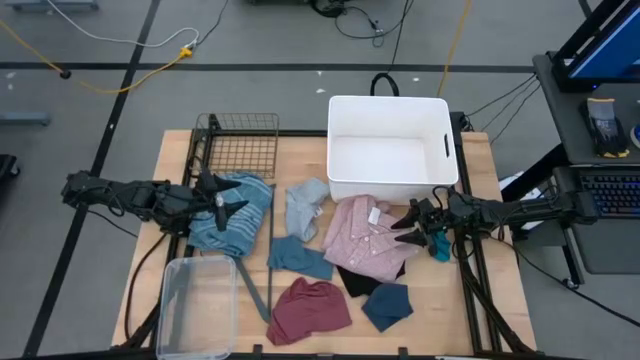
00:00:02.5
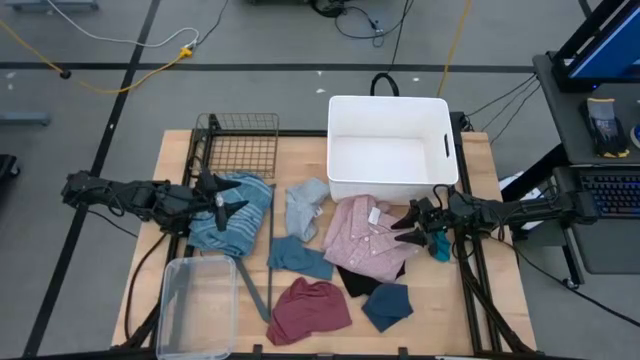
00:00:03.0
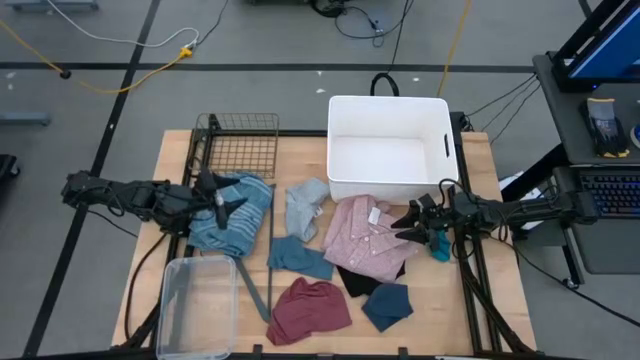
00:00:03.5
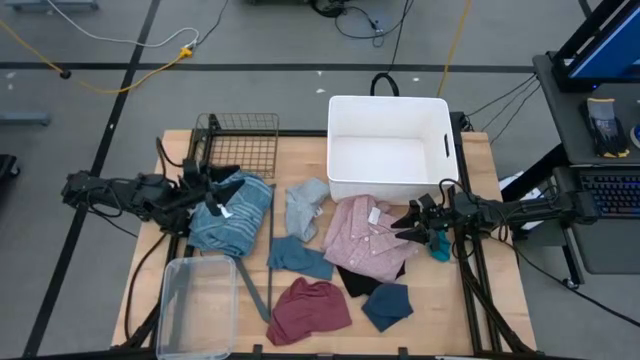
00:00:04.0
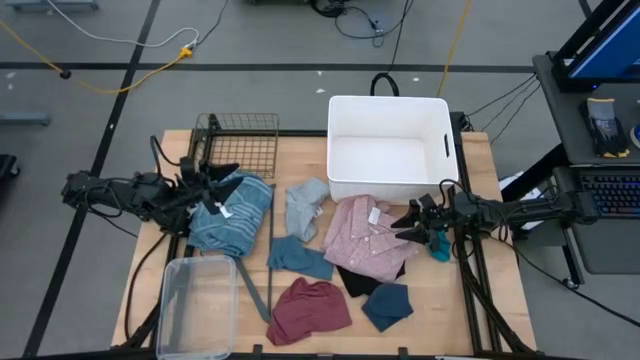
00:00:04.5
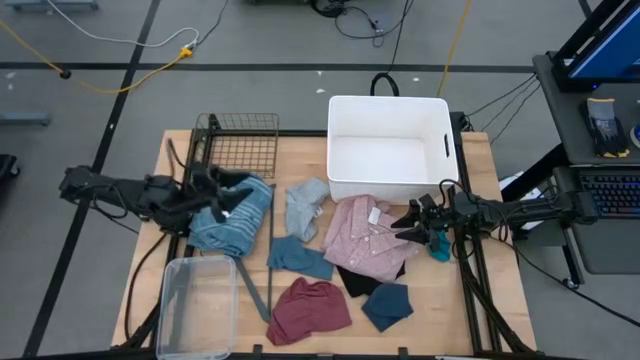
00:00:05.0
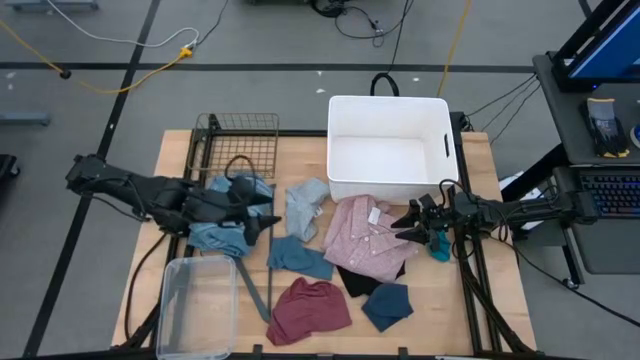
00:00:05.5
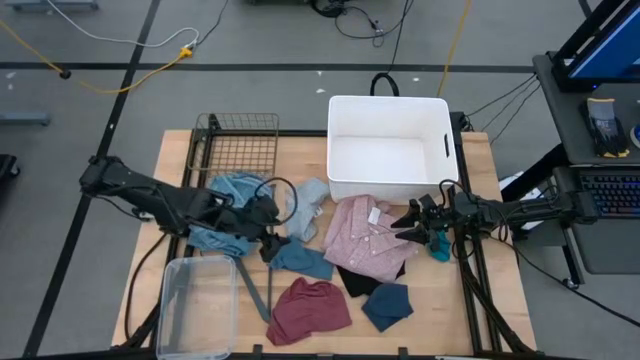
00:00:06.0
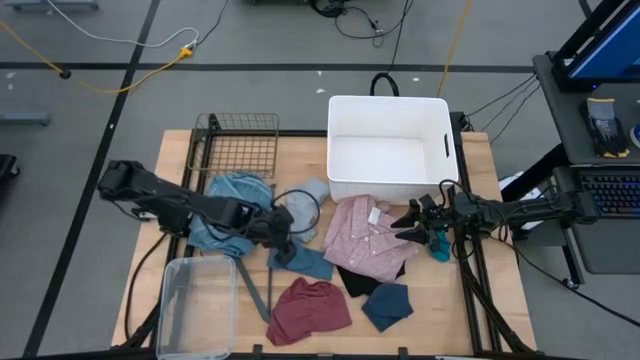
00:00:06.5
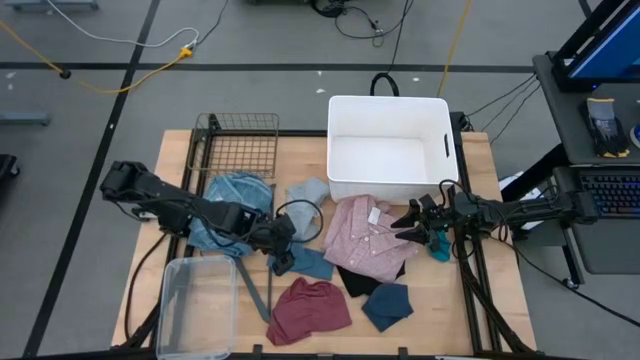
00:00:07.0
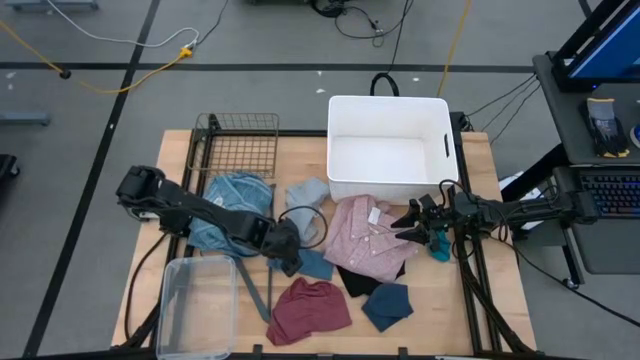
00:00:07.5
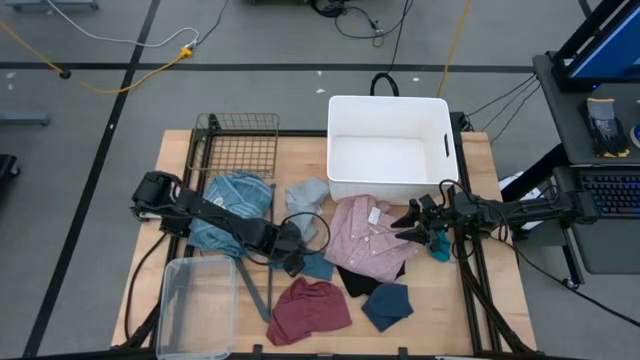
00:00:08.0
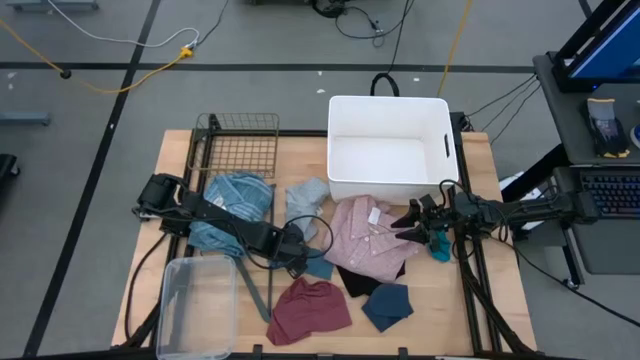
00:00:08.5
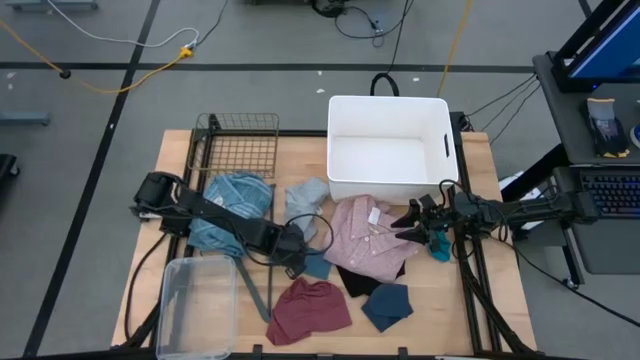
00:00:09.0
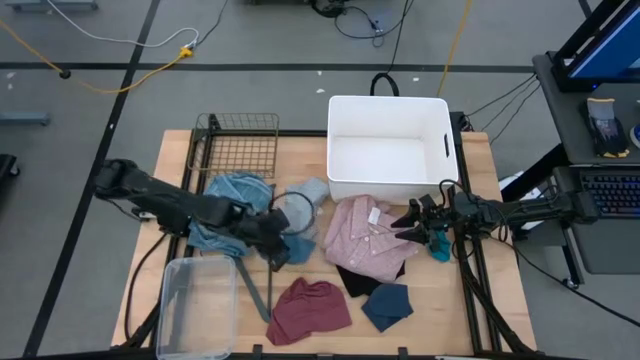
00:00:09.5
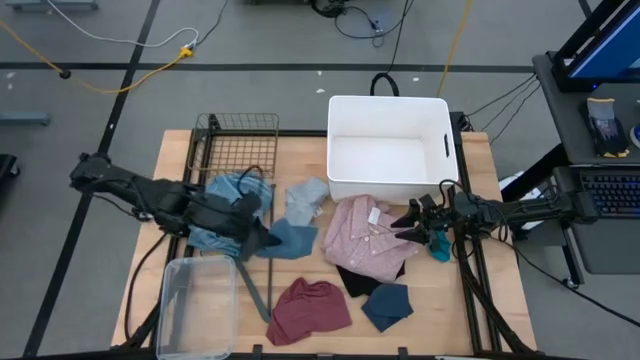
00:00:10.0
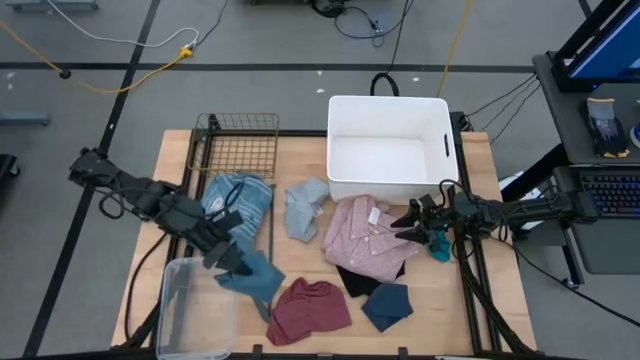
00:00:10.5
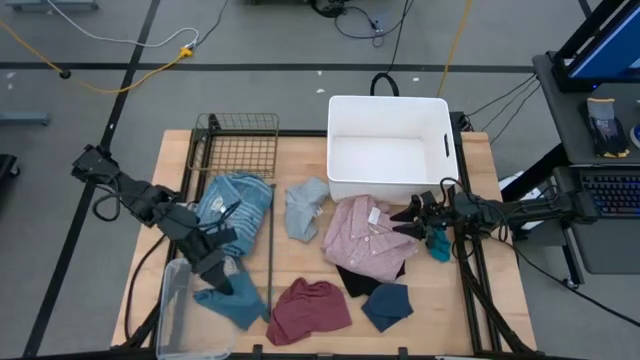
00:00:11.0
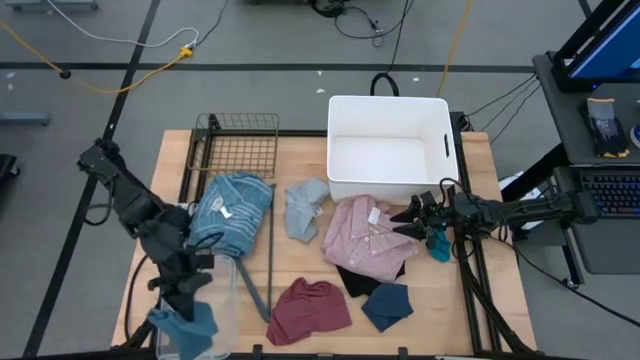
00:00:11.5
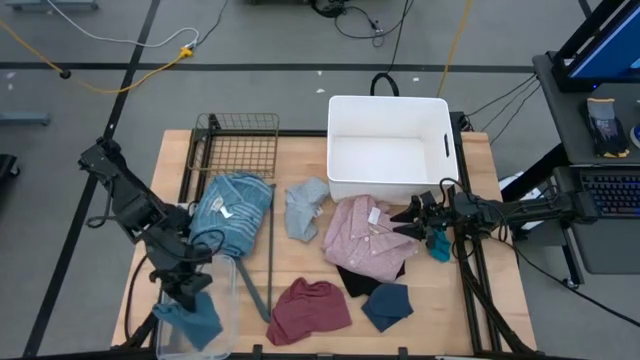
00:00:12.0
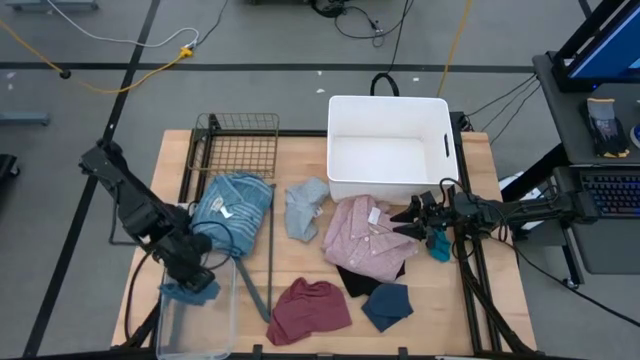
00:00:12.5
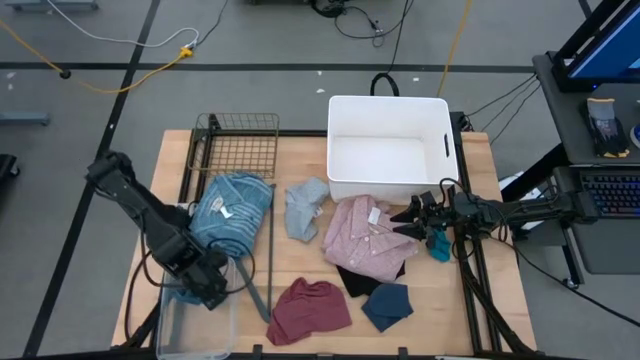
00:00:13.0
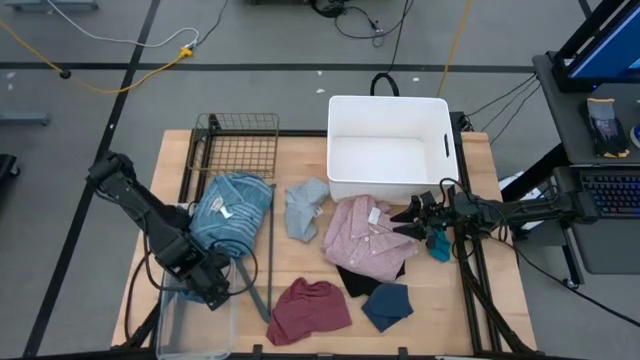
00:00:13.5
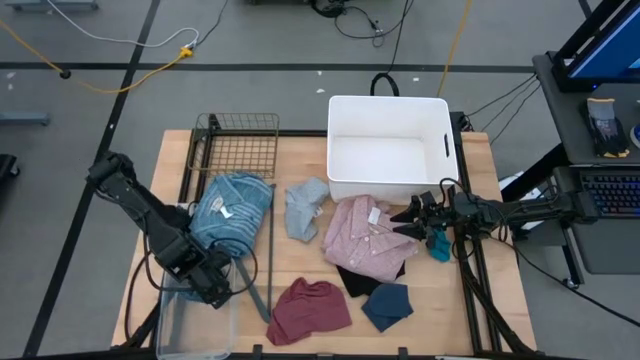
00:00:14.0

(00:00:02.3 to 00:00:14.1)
Task: Pick & Place Cloths
Put the blue sock into the transparent bin

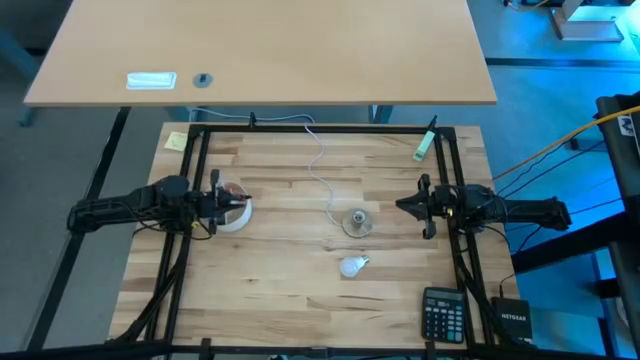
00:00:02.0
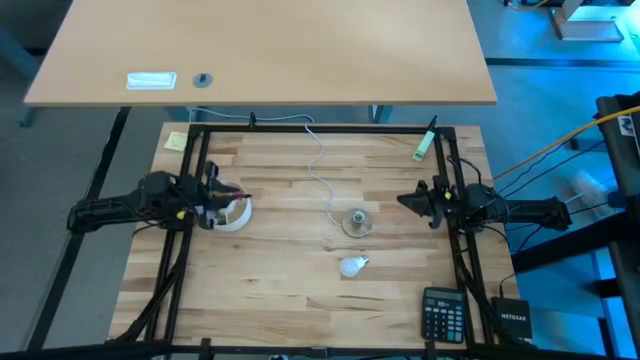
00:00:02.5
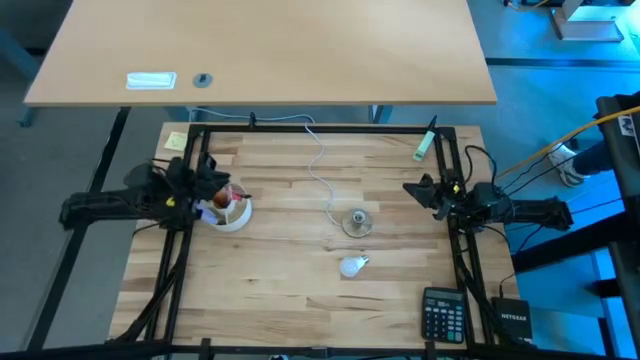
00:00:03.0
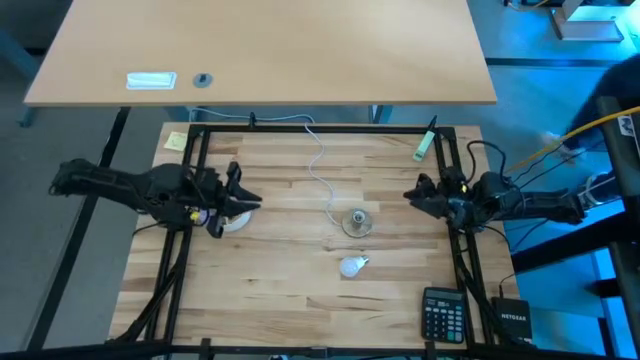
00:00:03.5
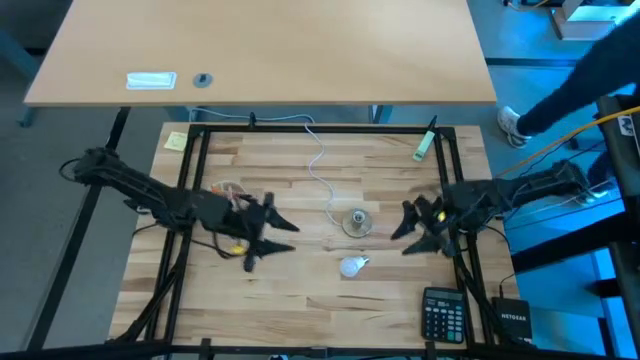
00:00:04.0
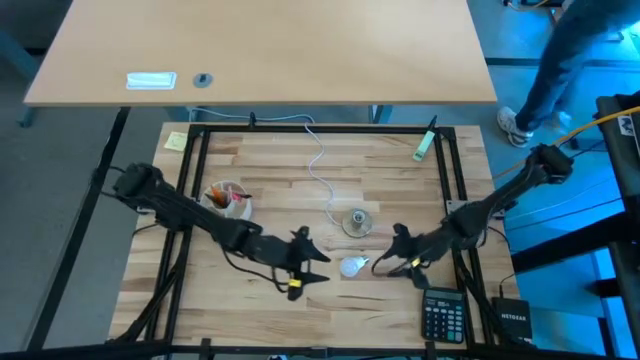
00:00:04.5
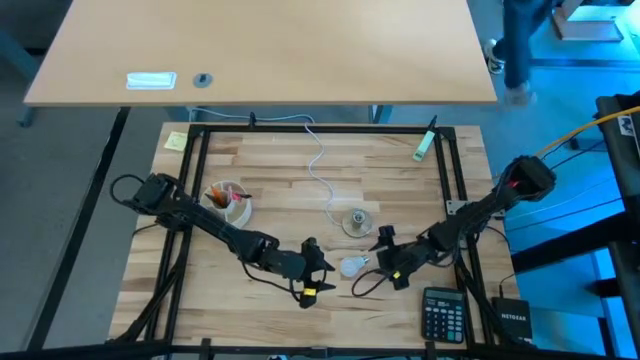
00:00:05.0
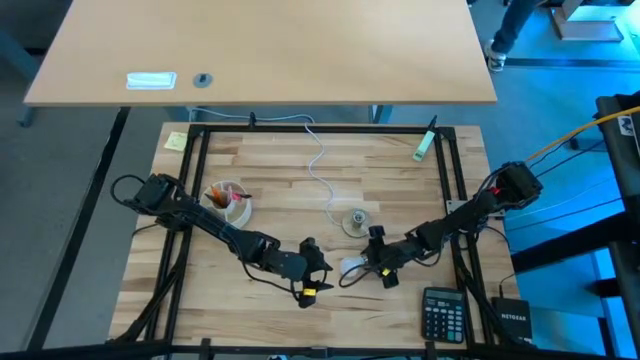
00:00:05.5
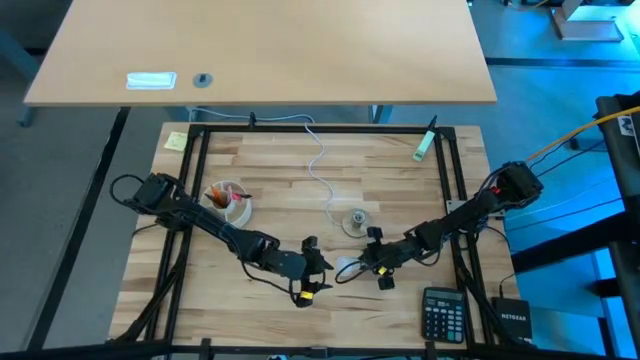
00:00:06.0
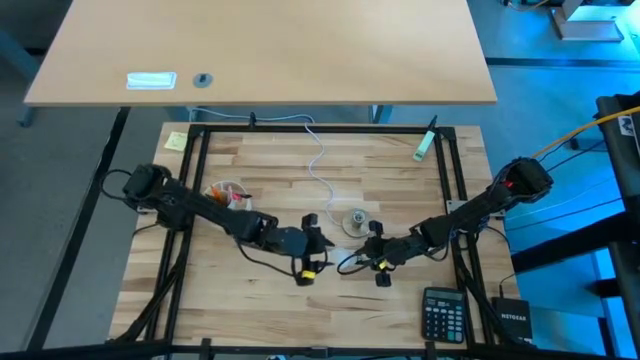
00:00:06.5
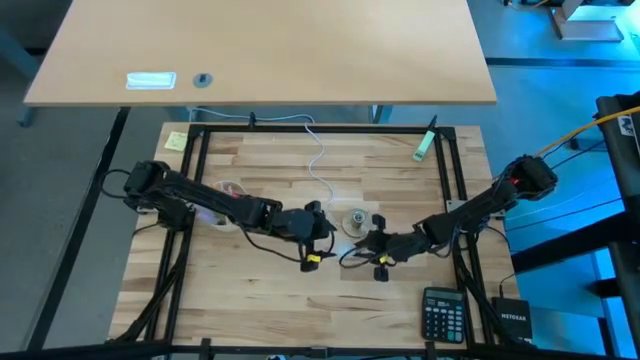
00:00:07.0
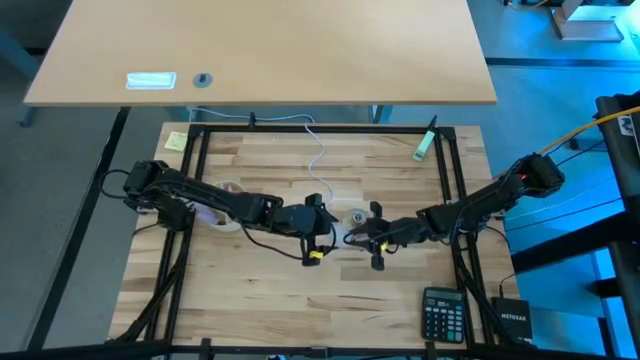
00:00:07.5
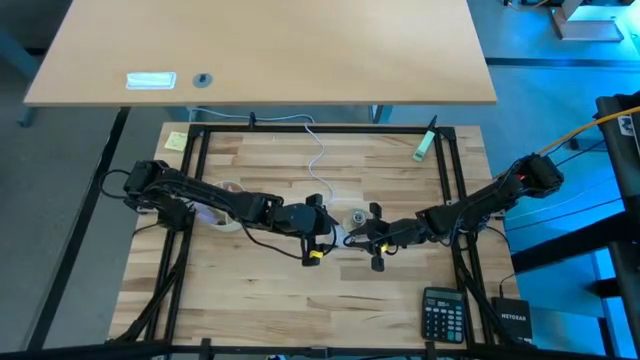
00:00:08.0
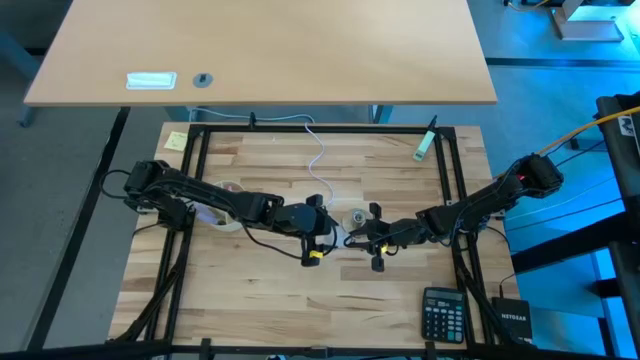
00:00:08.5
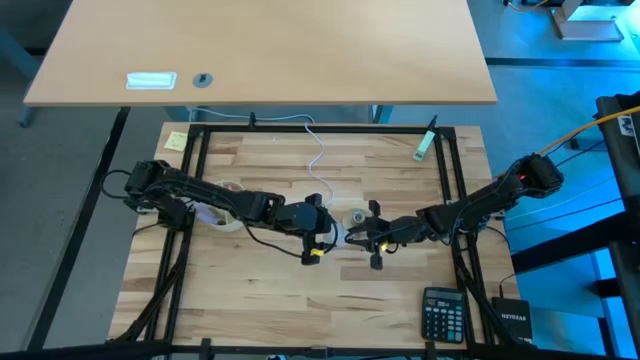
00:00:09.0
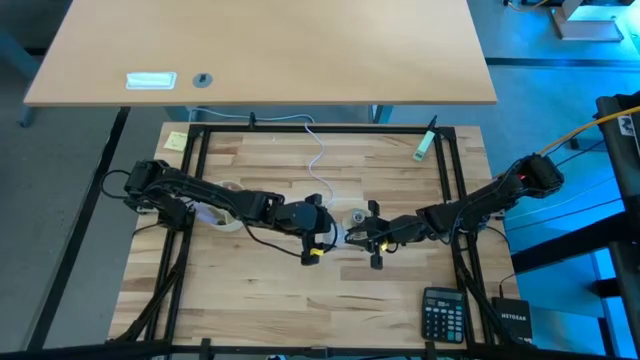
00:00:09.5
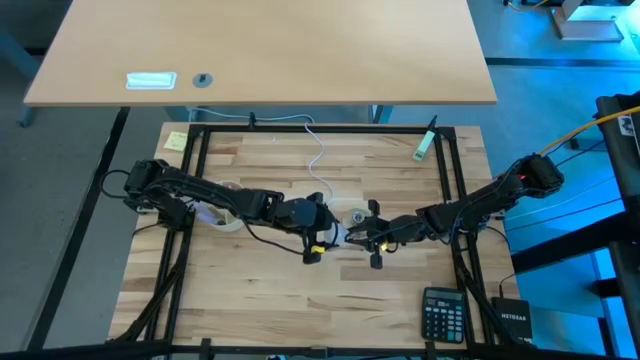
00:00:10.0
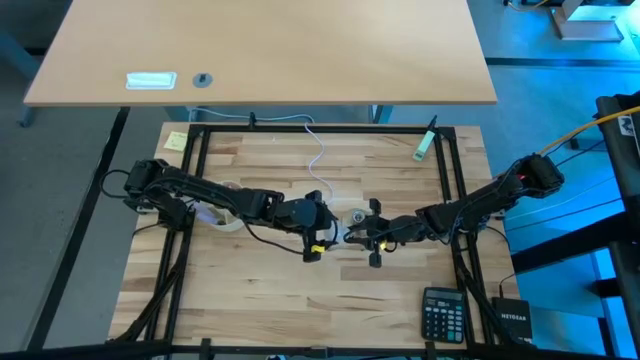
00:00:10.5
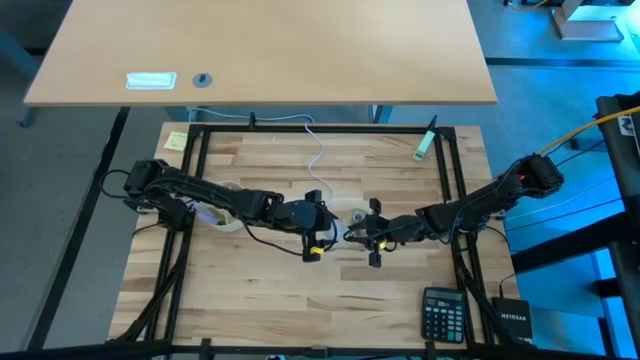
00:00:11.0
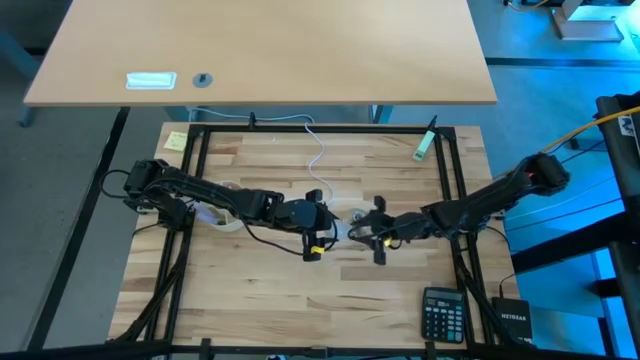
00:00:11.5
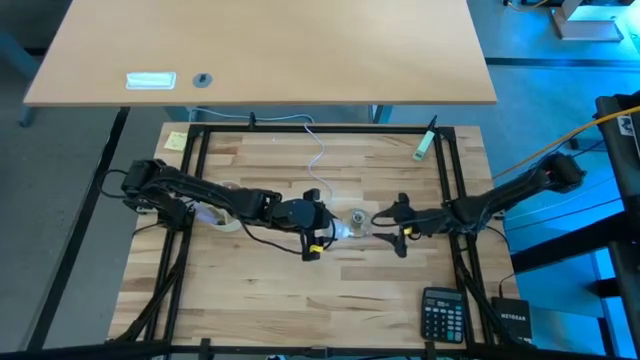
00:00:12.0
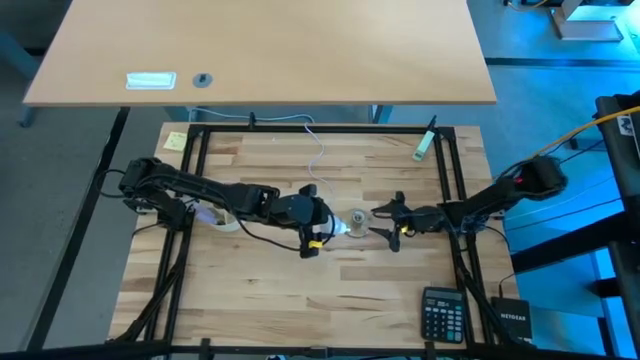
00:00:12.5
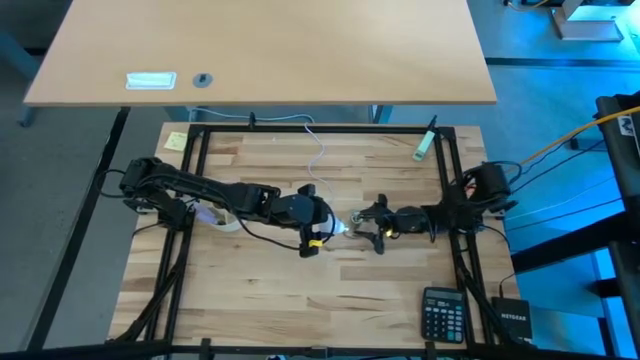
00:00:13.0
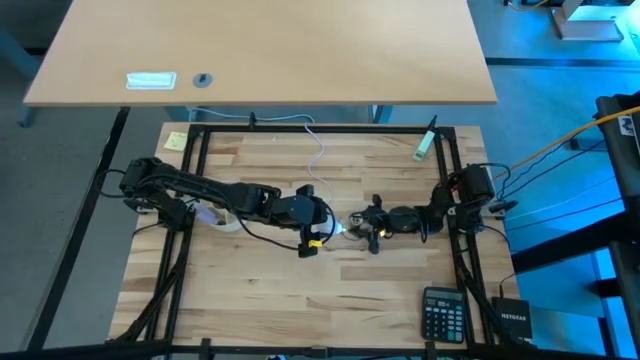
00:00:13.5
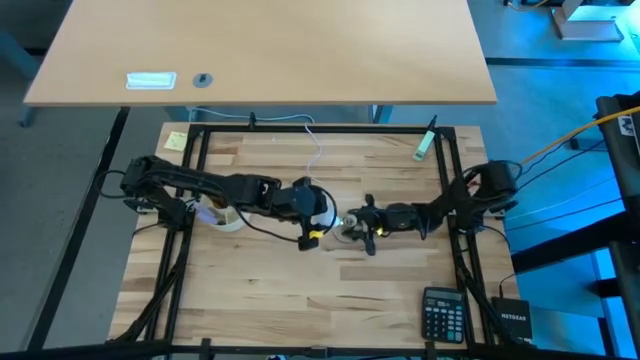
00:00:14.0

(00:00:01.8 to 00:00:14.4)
Task: Screw lightbulb
Insert the lightbulb into the lamp
